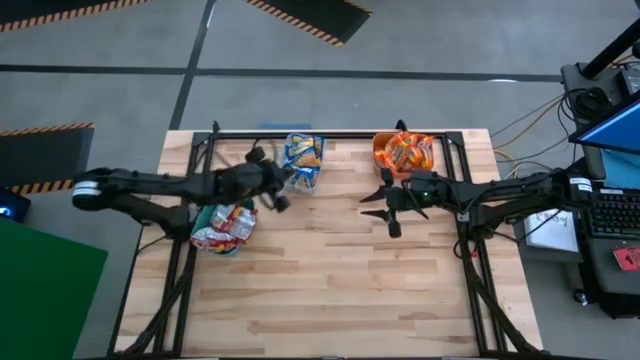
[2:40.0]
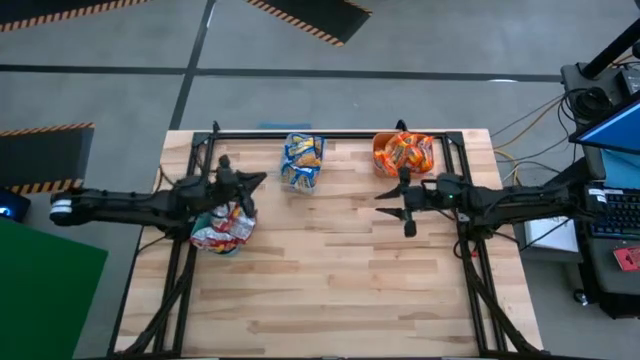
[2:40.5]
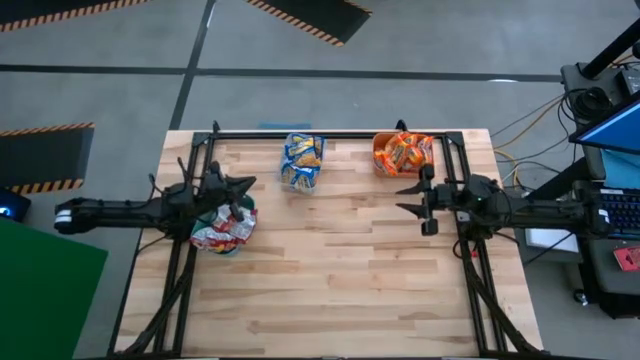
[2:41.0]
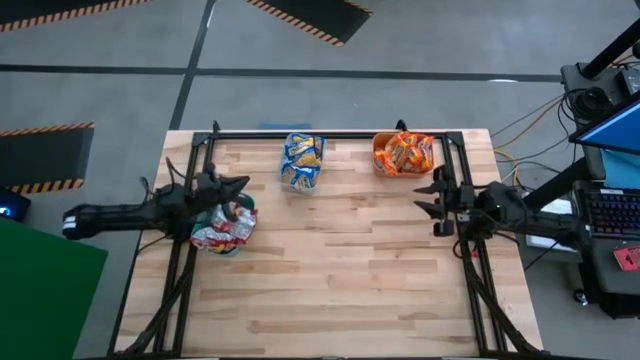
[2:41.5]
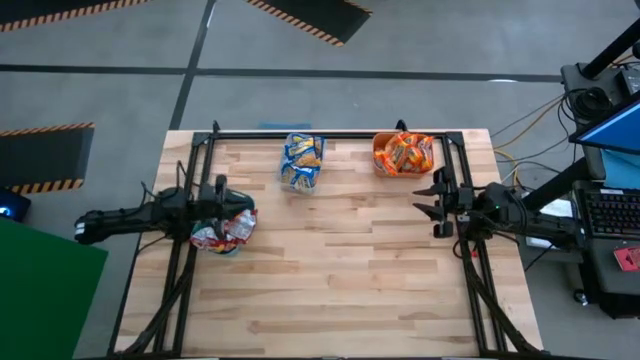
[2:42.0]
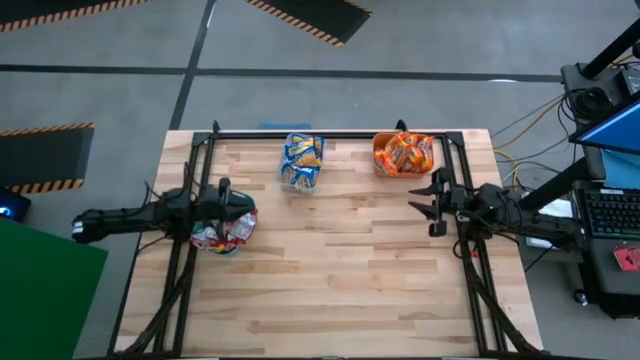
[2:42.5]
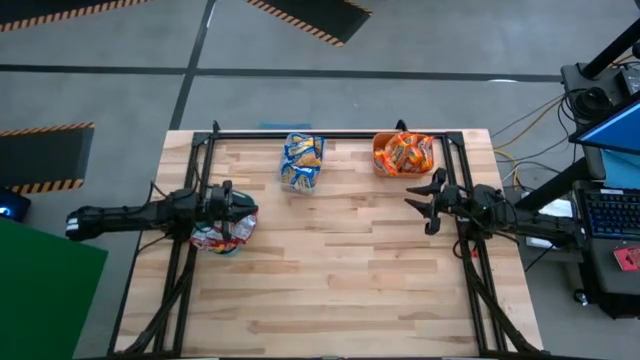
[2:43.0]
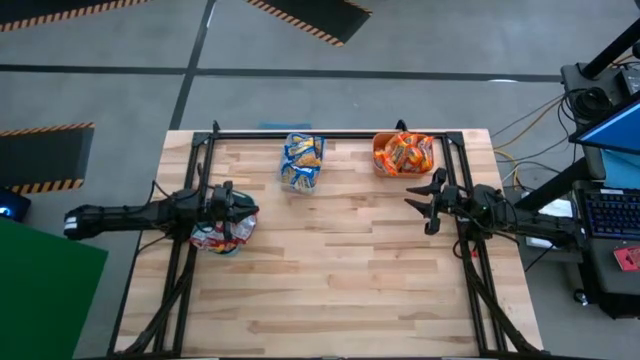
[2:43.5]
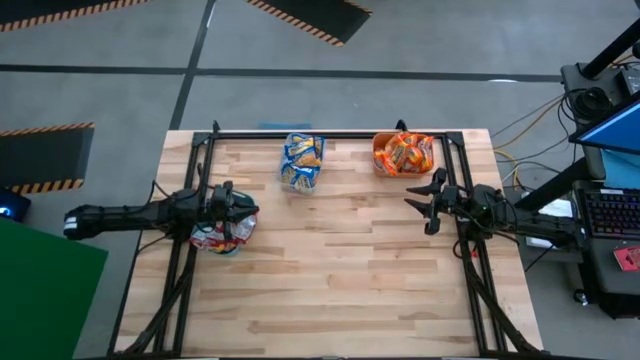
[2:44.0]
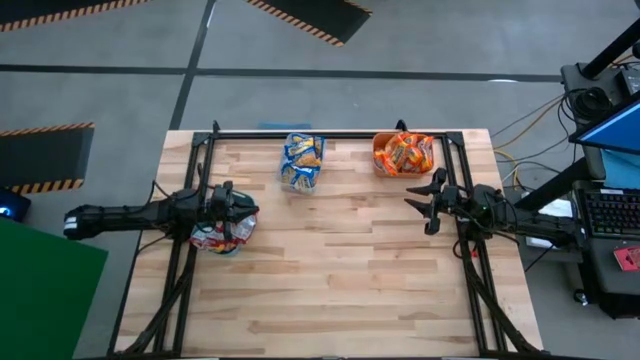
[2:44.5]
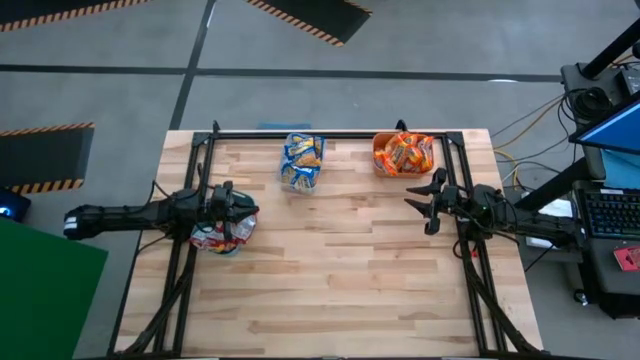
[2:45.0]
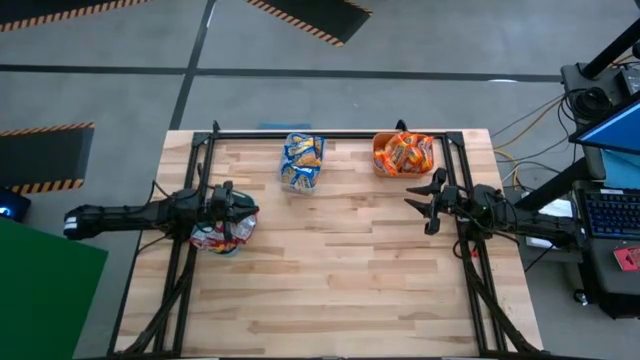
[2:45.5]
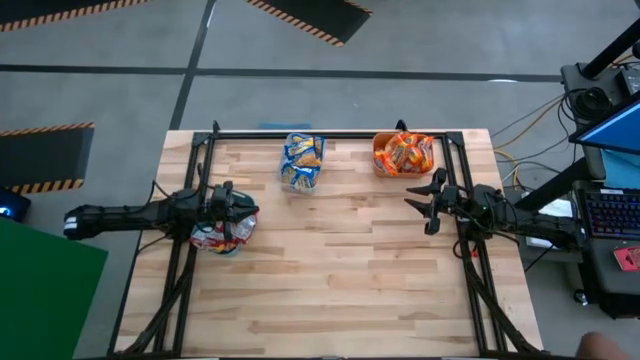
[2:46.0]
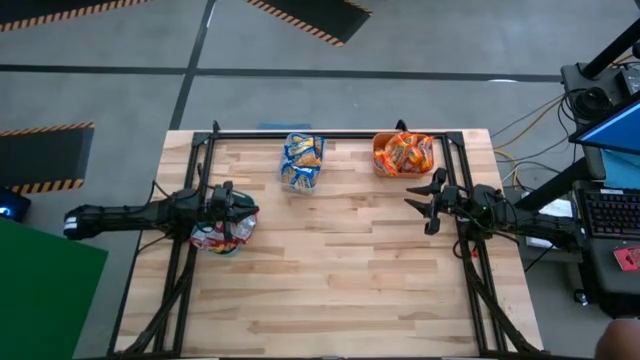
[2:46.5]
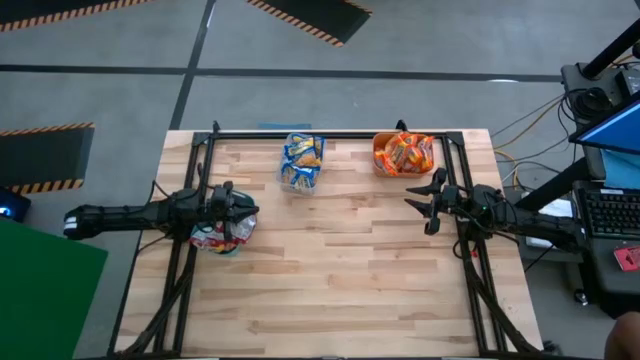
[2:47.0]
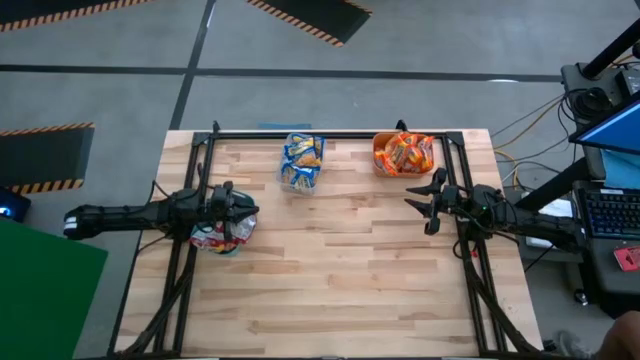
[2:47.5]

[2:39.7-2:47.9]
Task: Sort Maruchan noodles
Return to Home Position

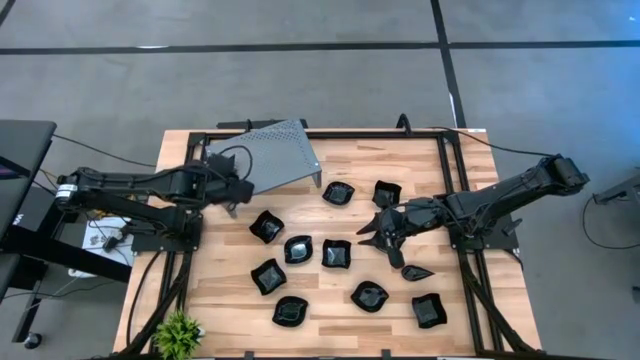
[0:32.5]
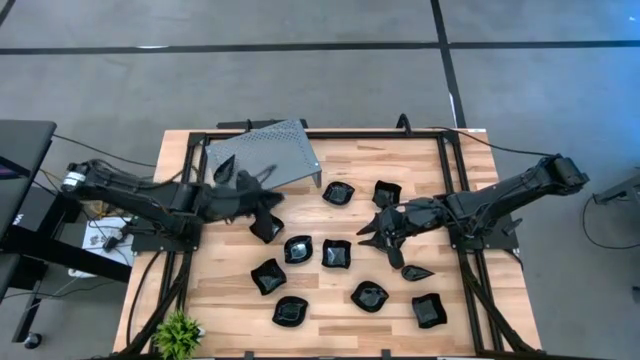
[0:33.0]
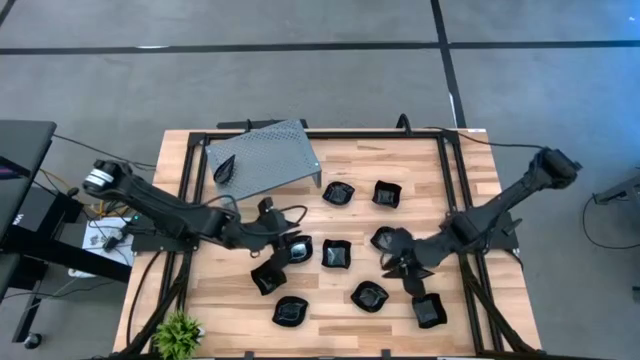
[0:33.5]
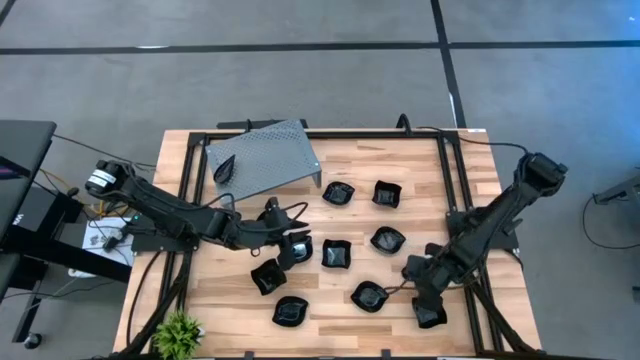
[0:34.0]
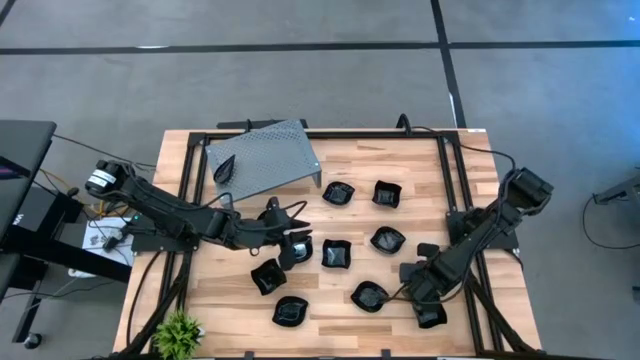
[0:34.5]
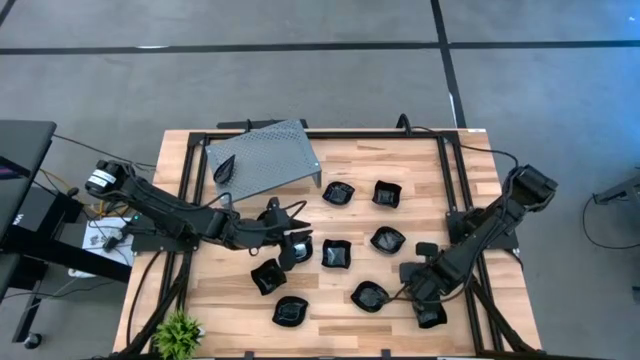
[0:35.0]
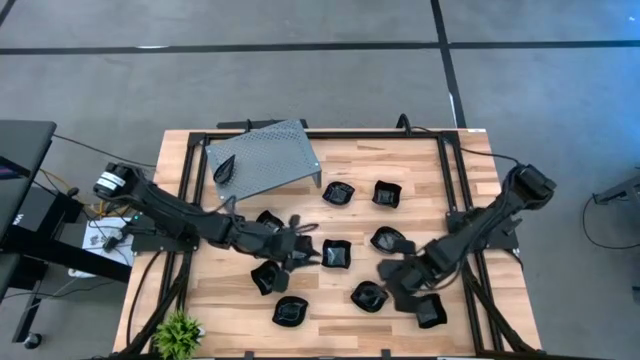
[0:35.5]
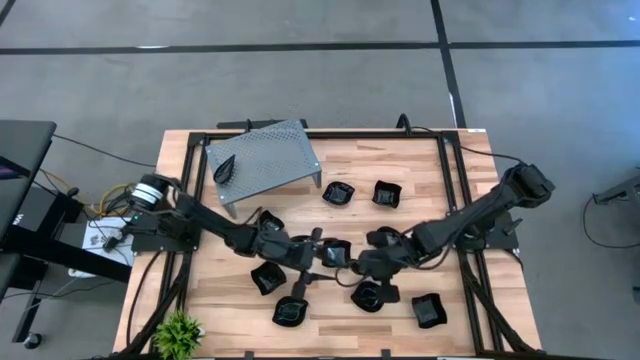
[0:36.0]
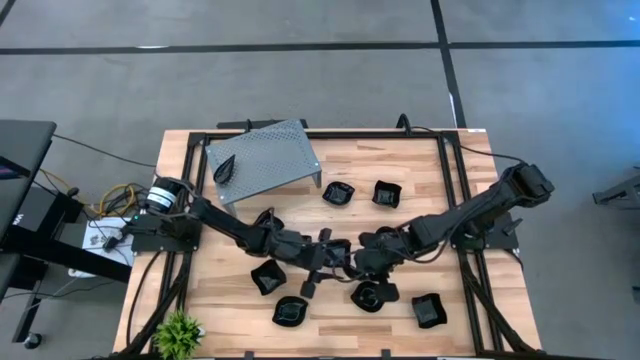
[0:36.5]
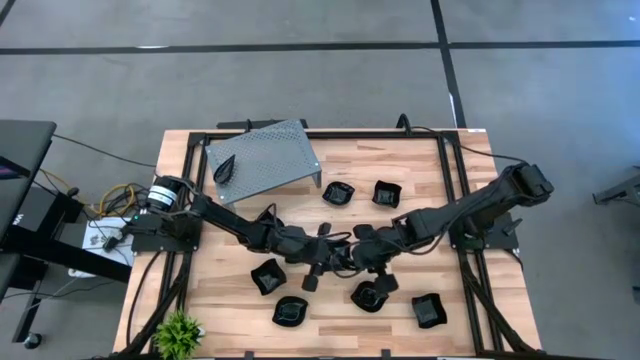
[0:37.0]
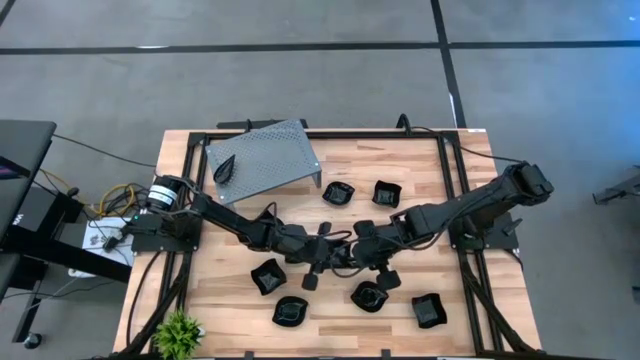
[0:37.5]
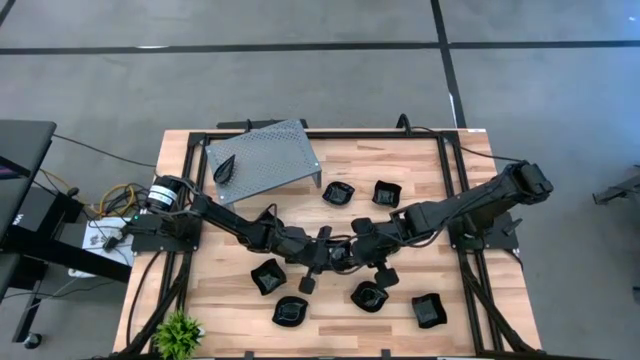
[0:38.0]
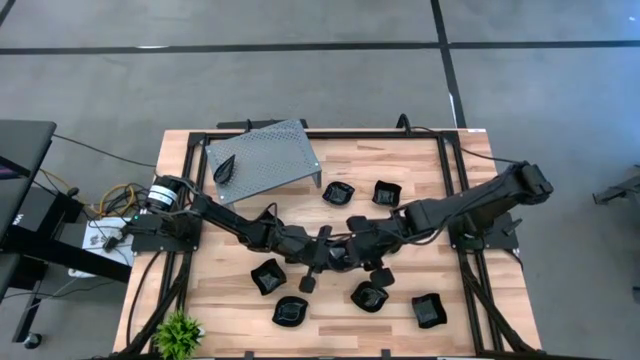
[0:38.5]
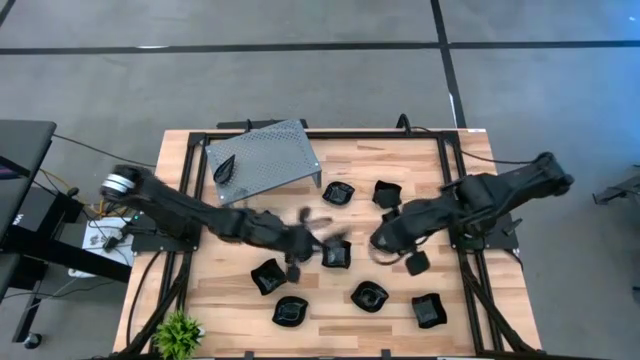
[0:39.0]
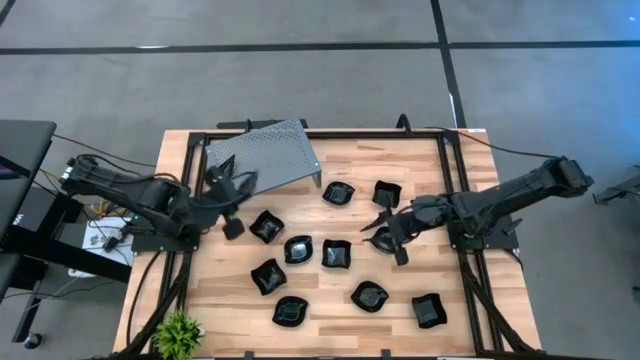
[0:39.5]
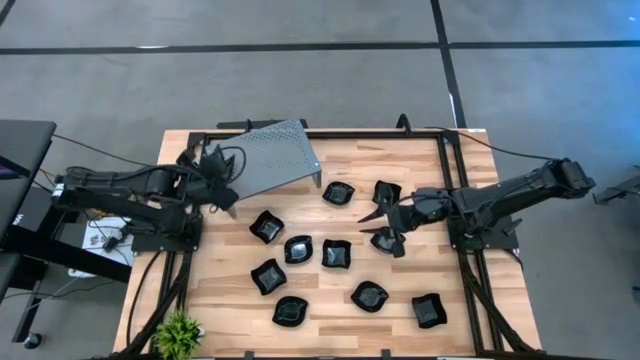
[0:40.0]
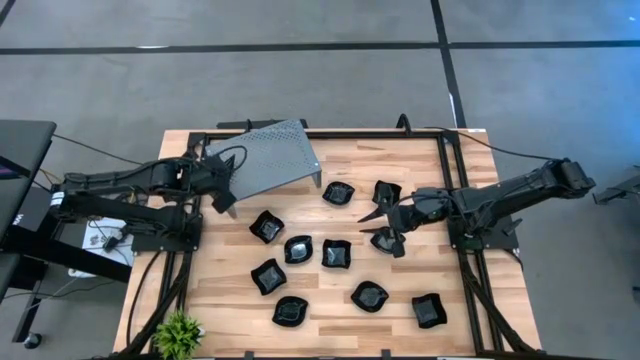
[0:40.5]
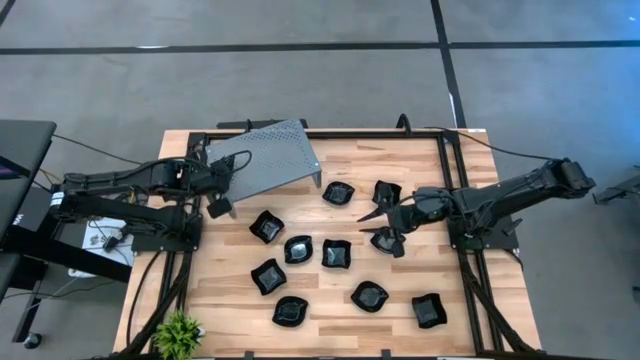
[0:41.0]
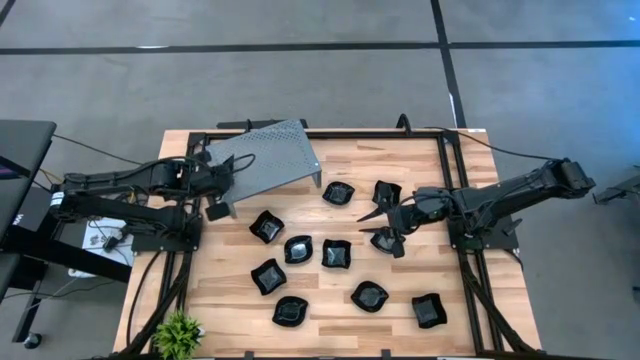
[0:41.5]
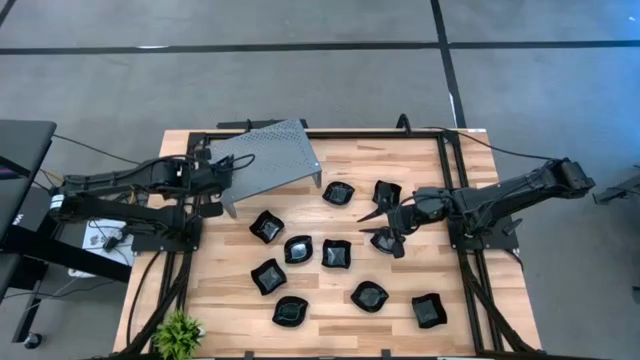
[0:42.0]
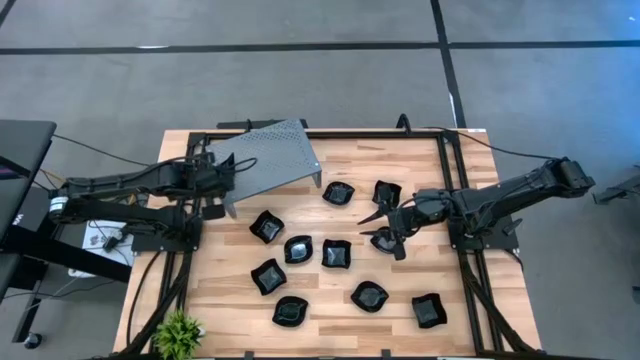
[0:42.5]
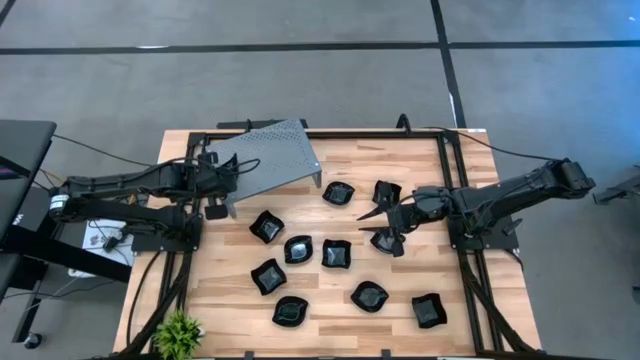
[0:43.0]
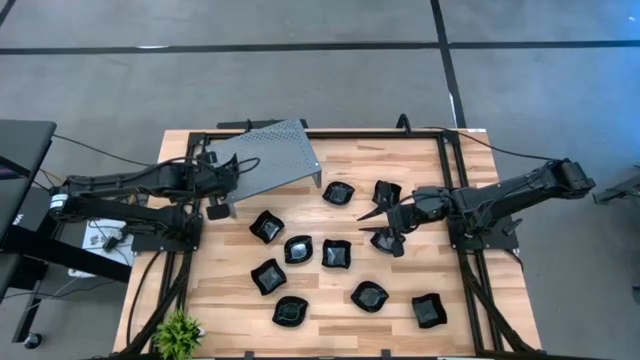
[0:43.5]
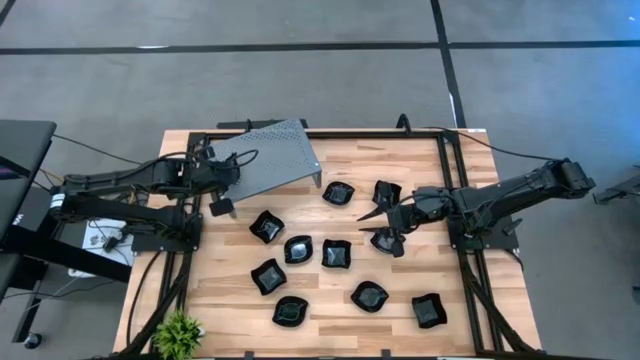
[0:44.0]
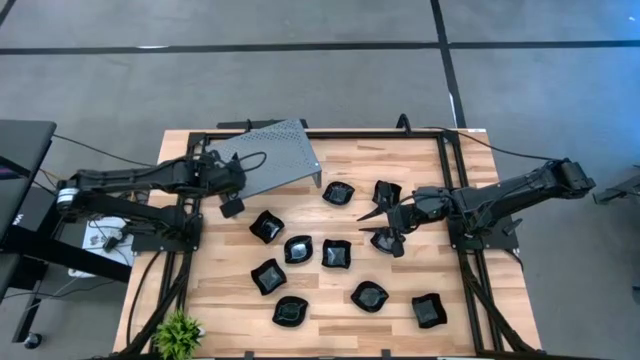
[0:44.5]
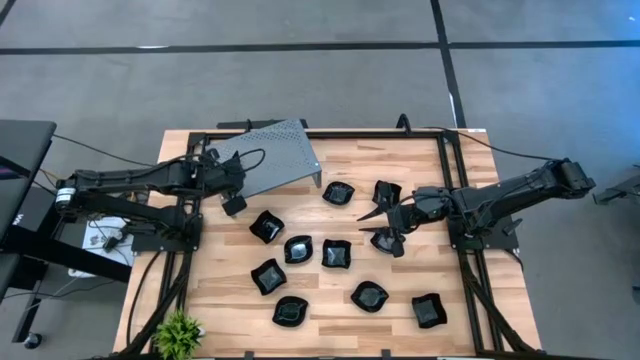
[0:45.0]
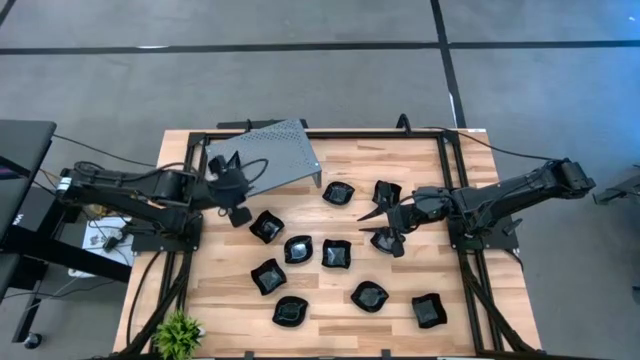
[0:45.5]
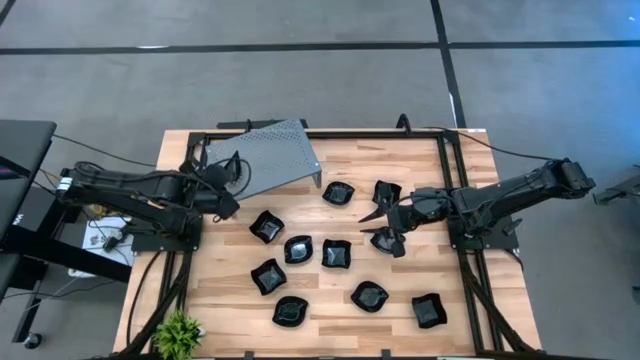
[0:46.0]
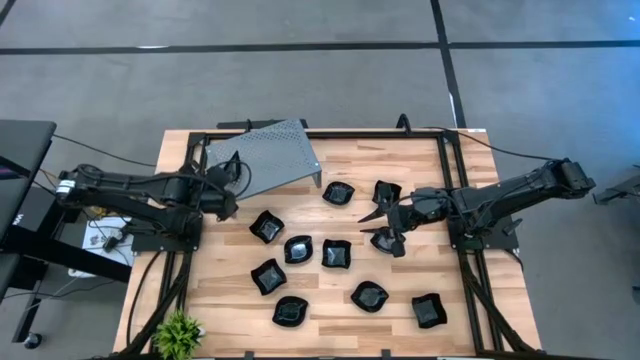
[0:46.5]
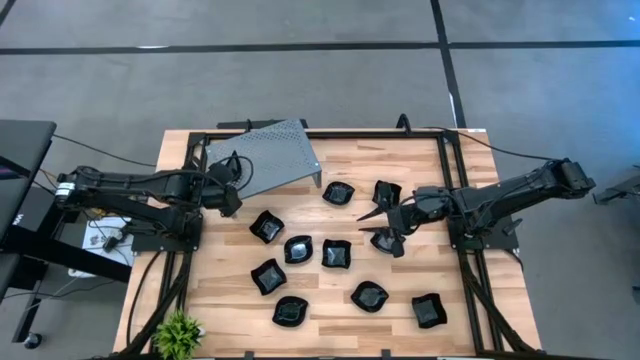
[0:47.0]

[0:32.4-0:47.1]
Task: Pick & Place Mini shaped plates
Stack the black drop plate on top of the black drop plate on the shelf
